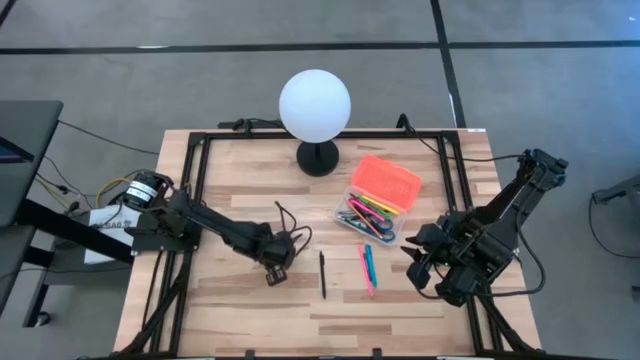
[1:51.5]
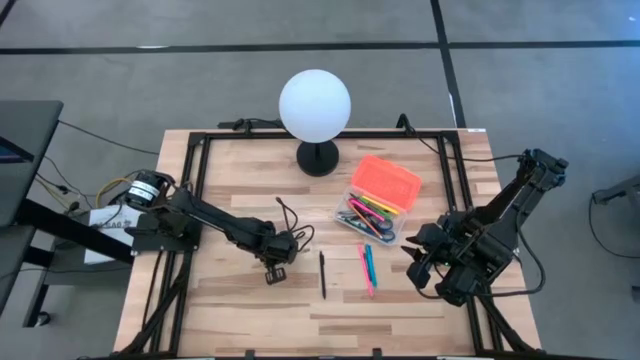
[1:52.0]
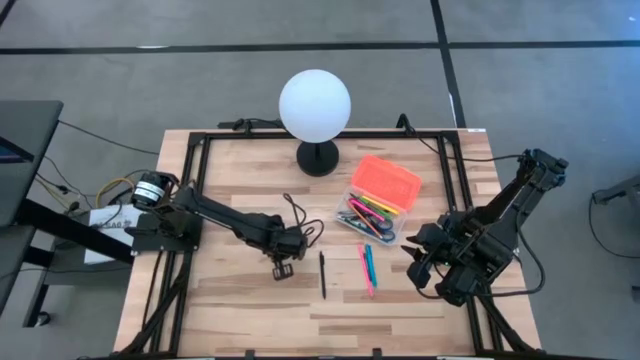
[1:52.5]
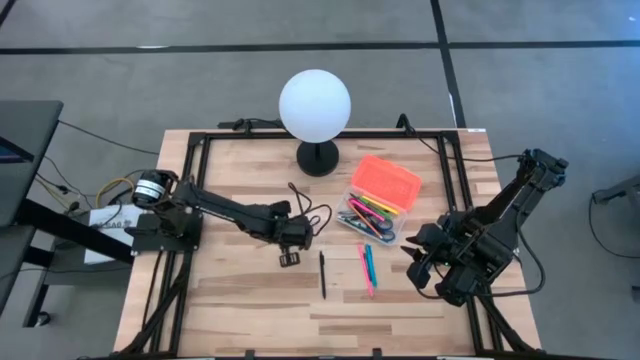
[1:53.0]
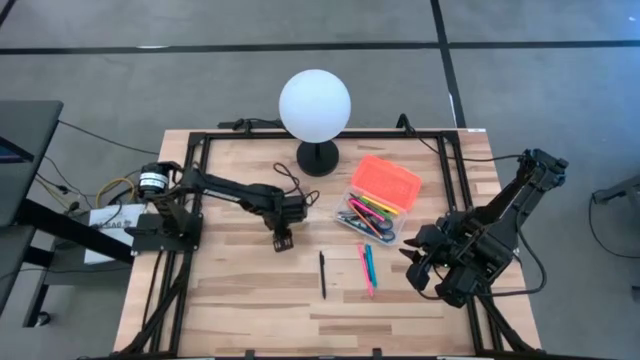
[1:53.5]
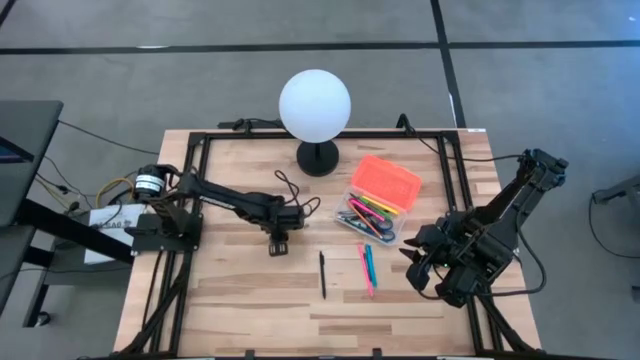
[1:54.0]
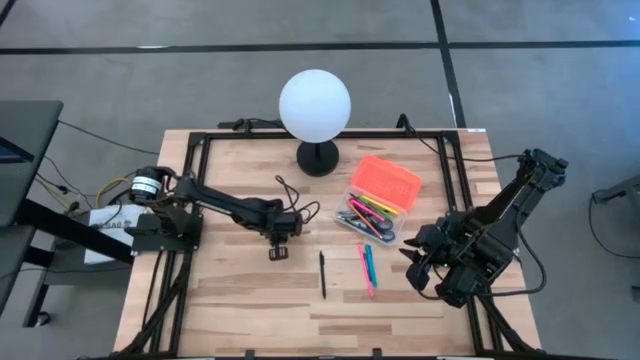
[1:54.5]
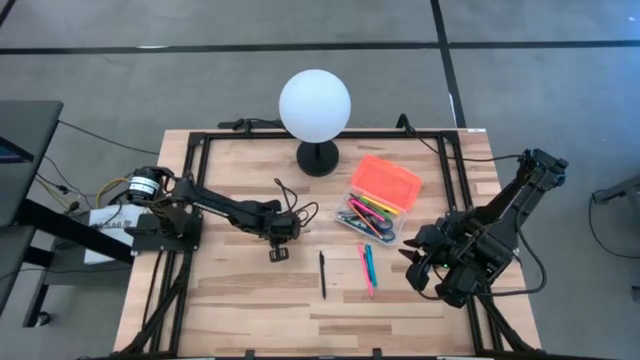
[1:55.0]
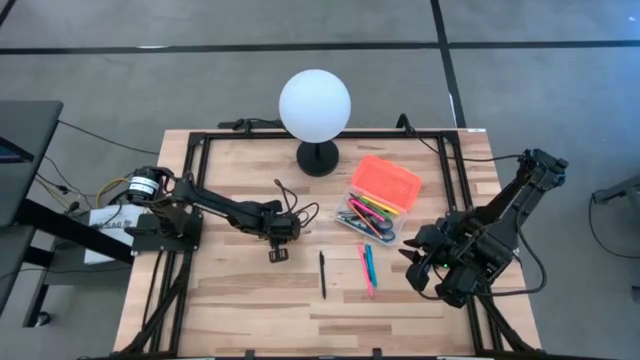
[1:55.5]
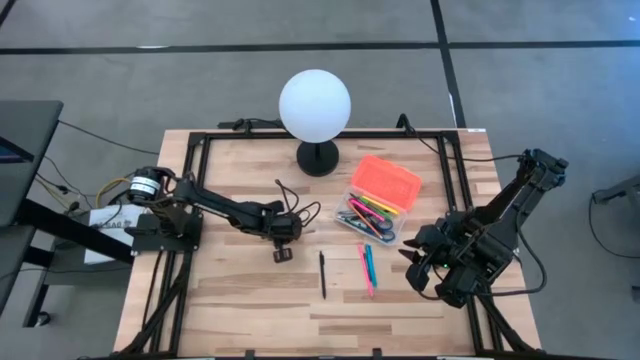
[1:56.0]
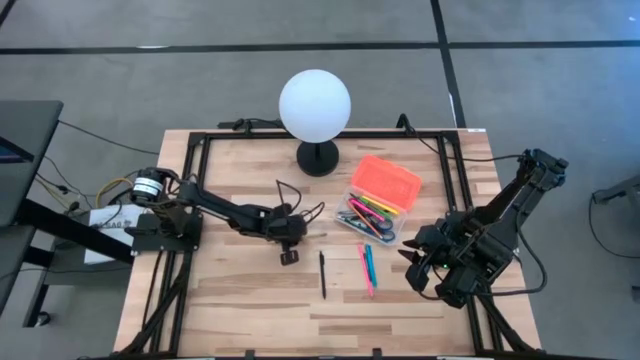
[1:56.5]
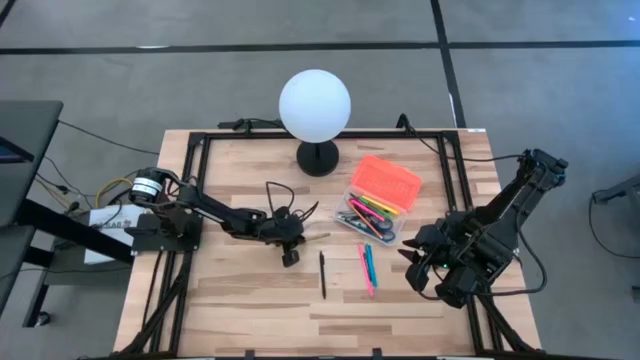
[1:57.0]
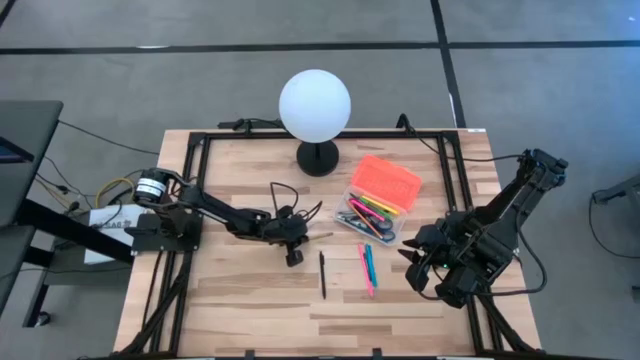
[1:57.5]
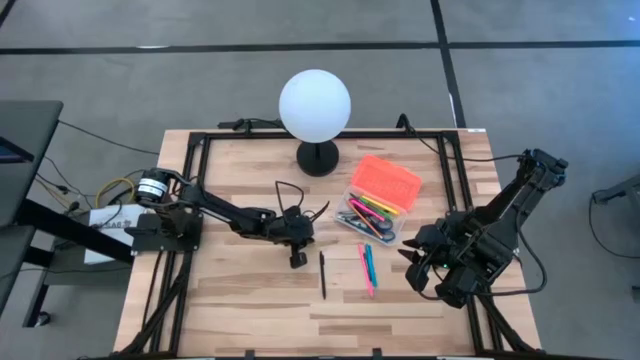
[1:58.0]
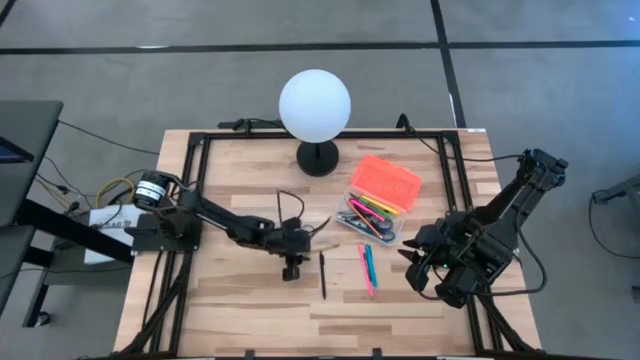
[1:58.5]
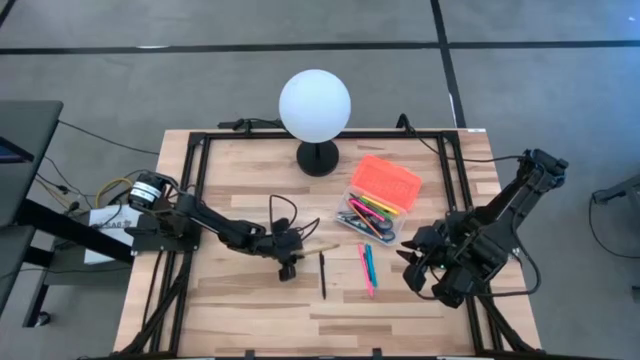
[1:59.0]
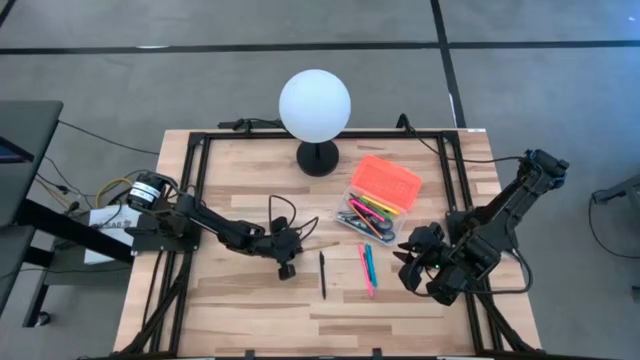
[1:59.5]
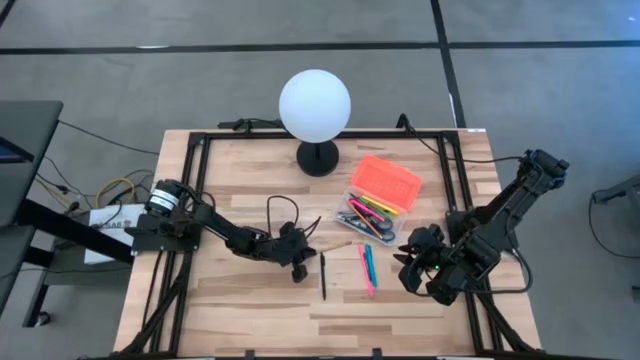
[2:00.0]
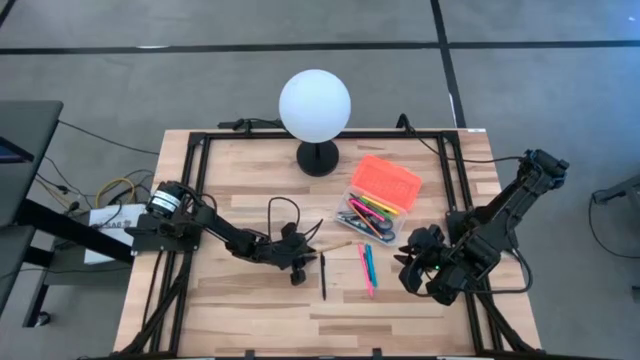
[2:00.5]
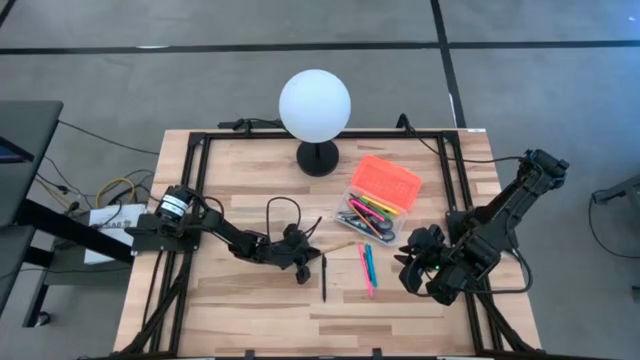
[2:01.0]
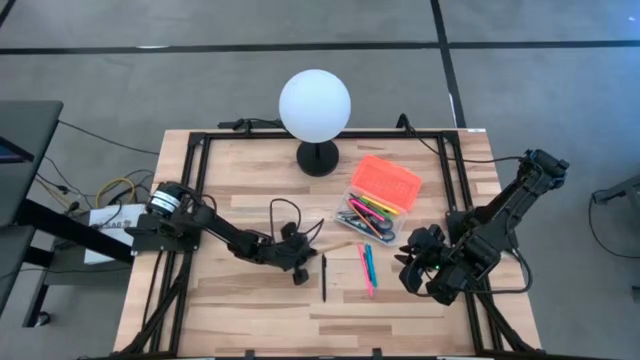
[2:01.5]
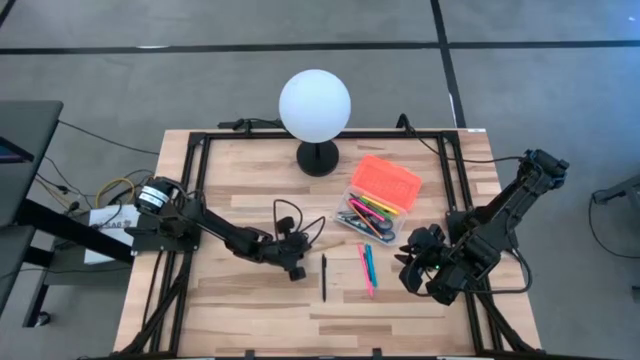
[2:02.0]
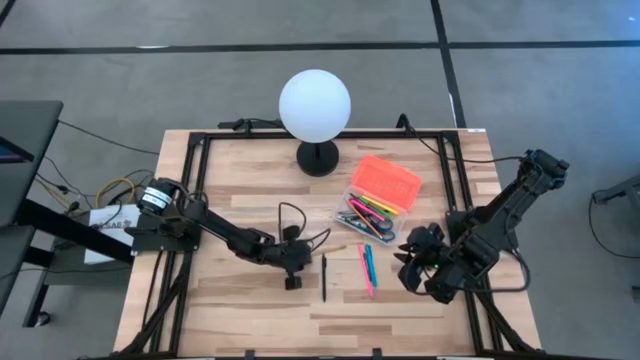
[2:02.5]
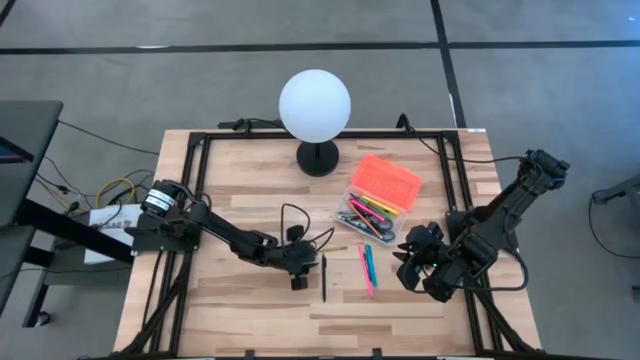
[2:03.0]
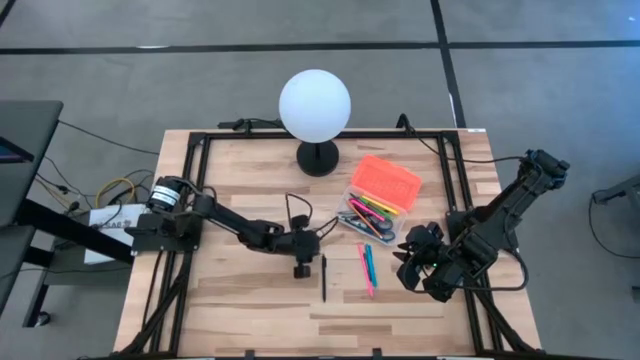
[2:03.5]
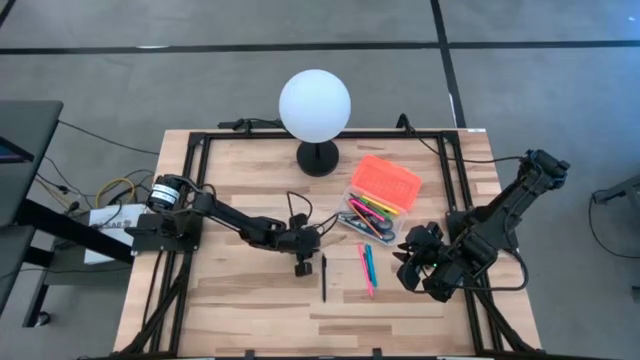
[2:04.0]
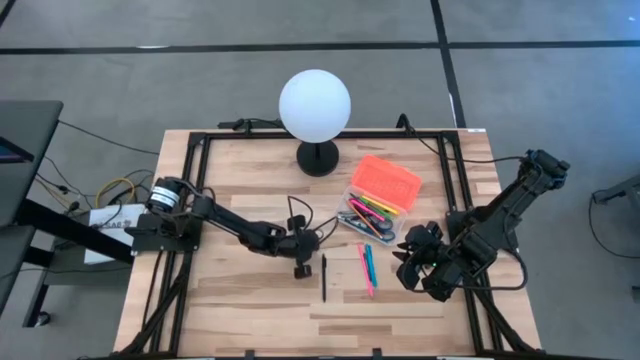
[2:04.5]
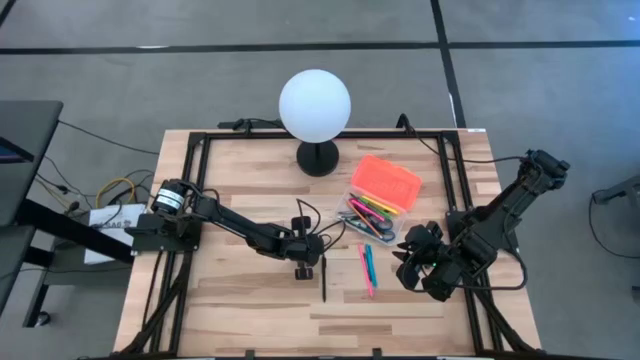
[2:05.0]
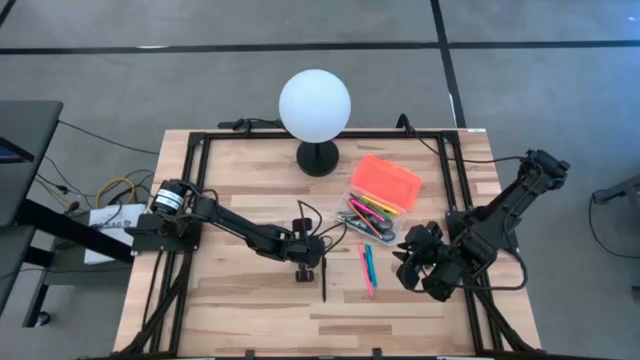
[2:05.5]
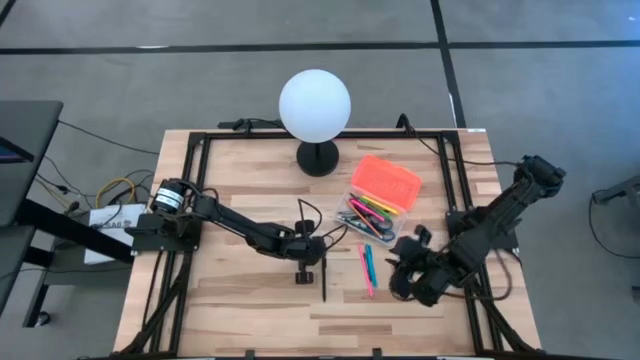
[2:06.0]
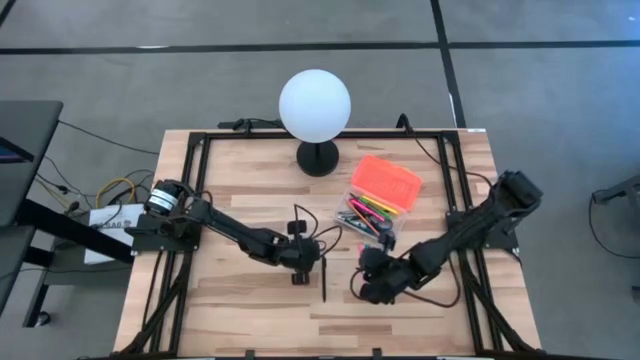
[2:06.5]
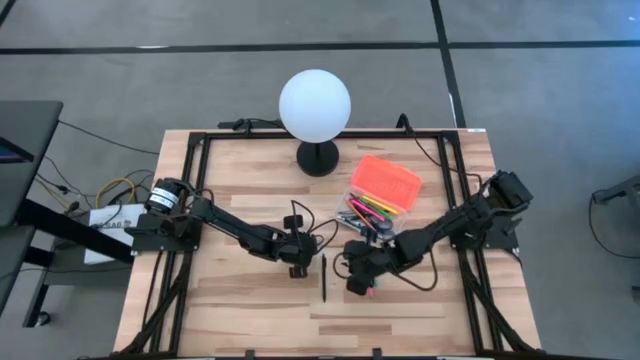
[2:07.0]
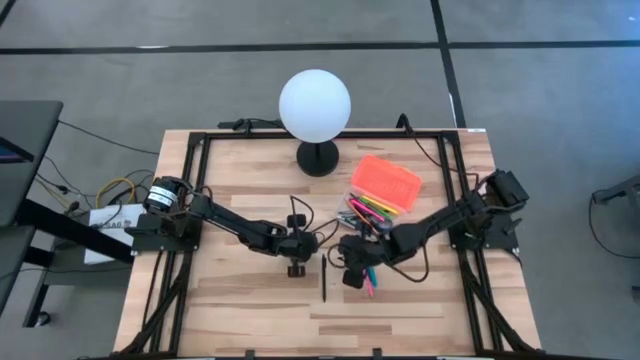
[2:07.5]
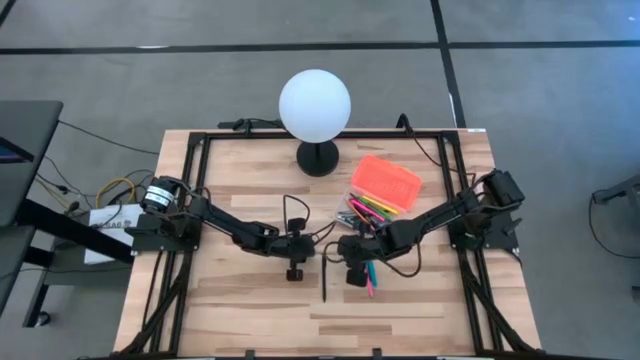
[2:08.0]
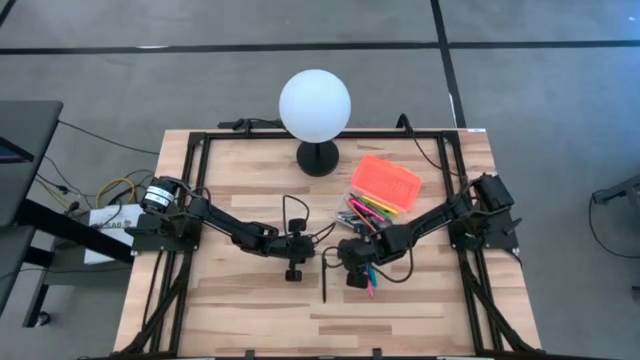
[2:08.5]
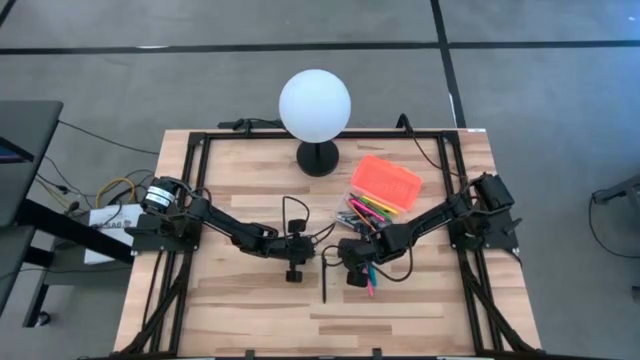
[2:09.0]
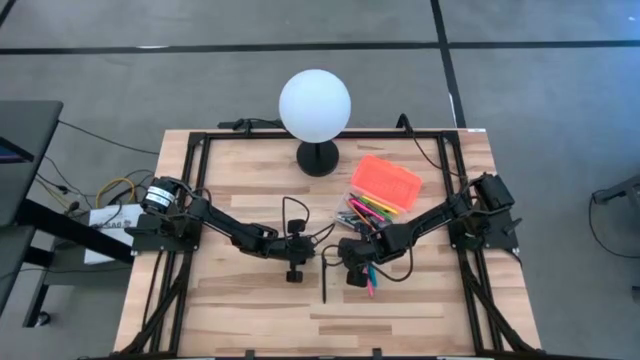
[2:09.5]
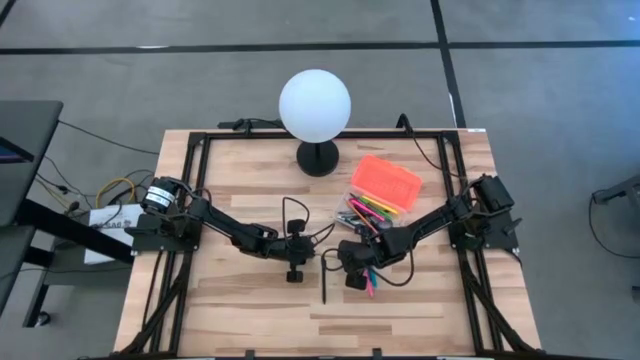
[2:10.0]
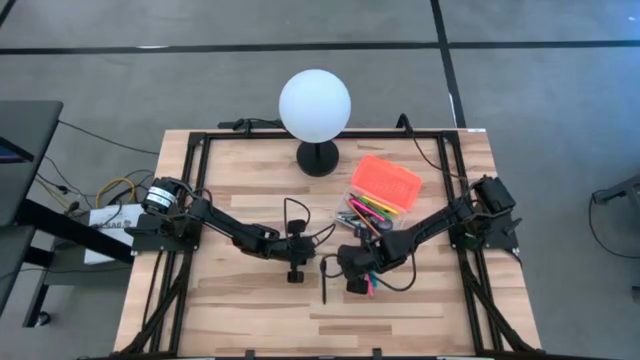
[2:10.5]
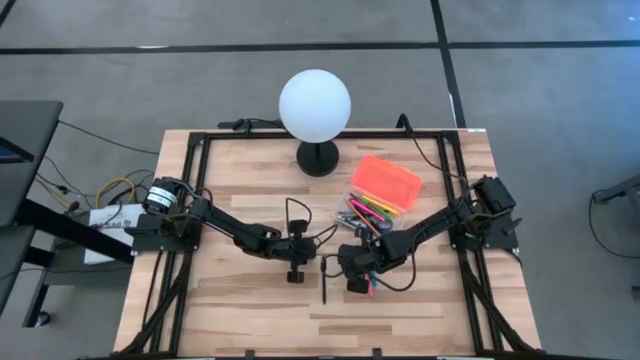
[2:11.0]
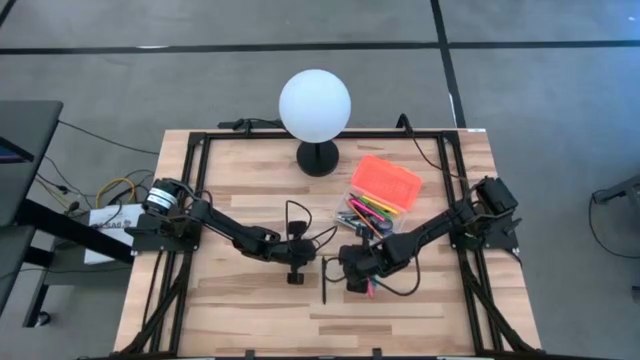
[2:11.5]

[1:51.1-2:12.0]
Task: Pick & place school supplies into a supply box
Put the yellow pencil into the orange supply box
